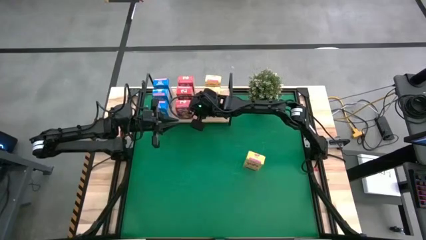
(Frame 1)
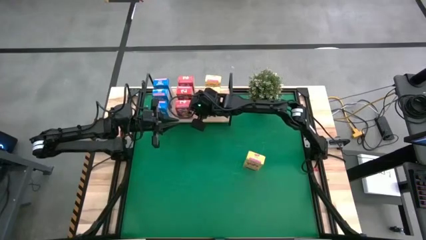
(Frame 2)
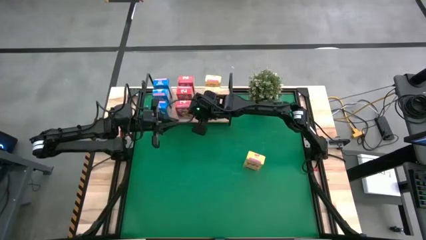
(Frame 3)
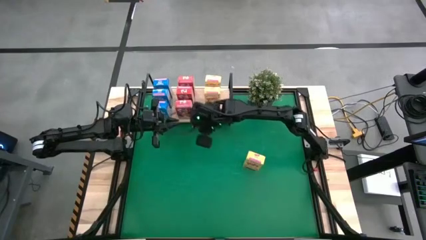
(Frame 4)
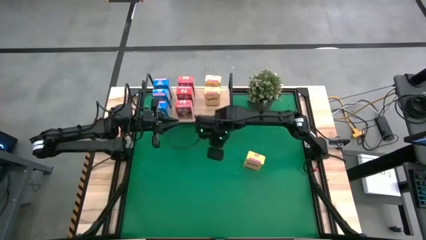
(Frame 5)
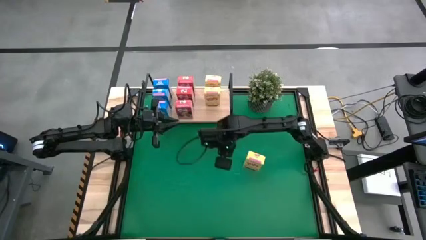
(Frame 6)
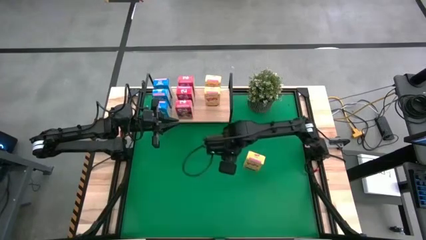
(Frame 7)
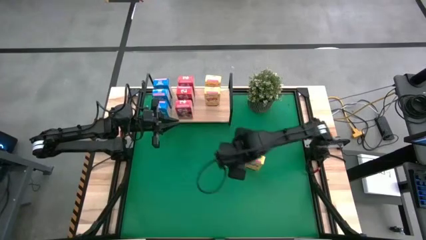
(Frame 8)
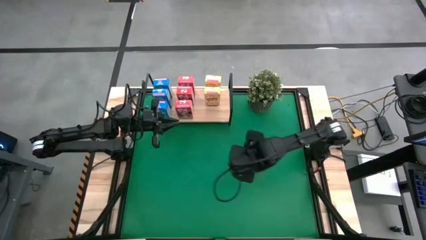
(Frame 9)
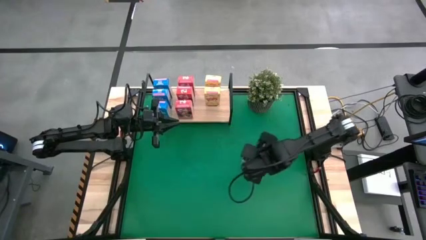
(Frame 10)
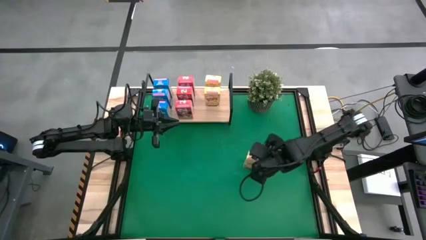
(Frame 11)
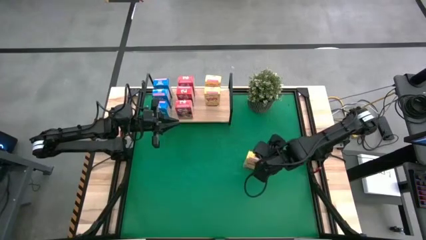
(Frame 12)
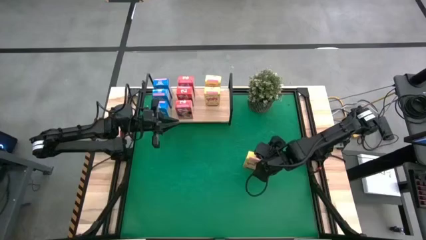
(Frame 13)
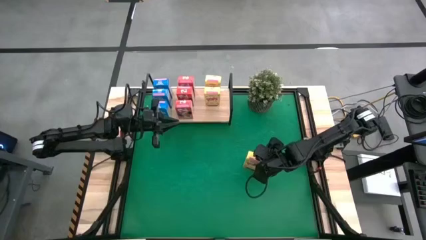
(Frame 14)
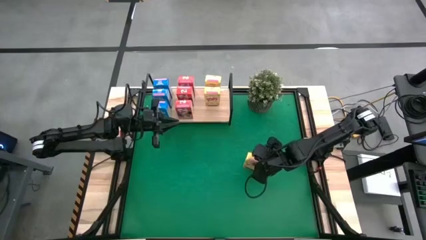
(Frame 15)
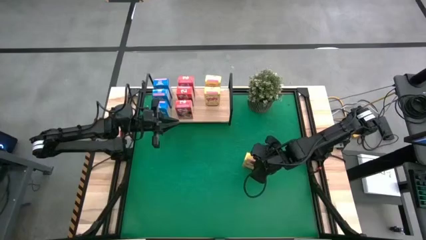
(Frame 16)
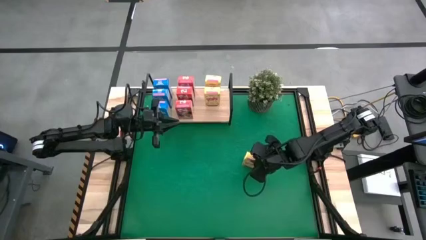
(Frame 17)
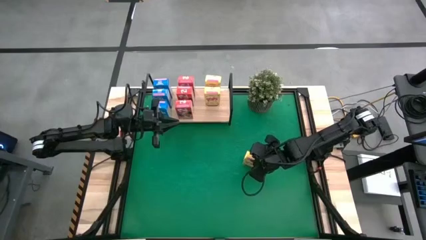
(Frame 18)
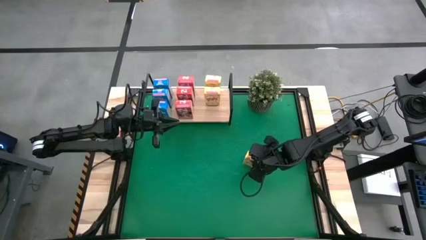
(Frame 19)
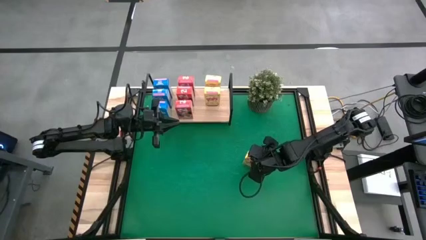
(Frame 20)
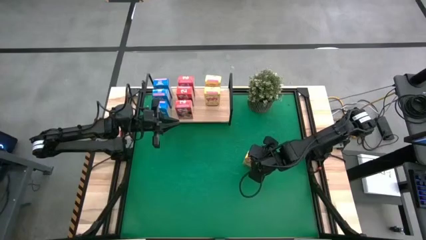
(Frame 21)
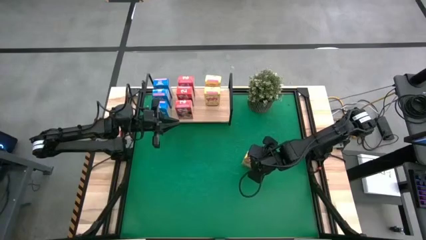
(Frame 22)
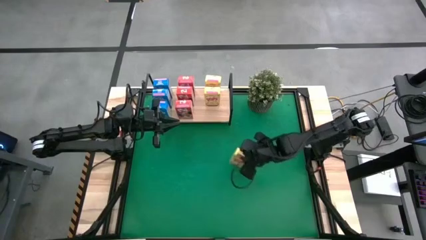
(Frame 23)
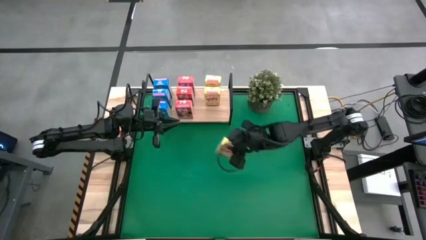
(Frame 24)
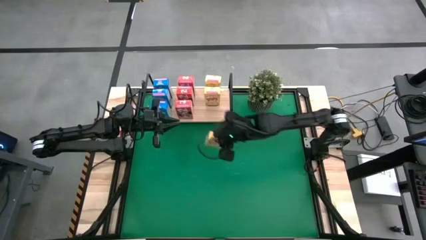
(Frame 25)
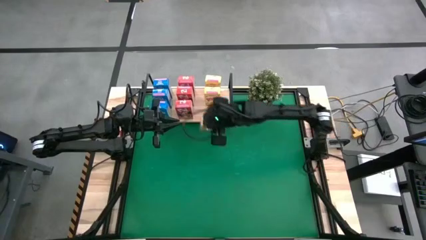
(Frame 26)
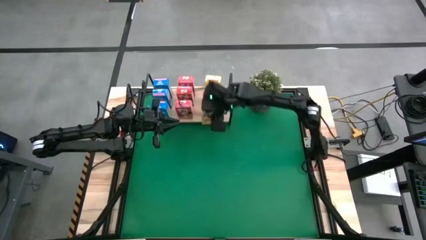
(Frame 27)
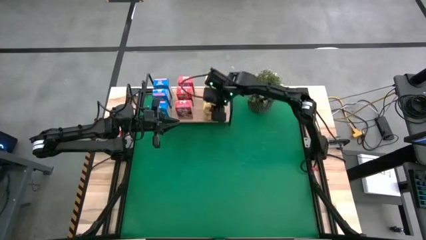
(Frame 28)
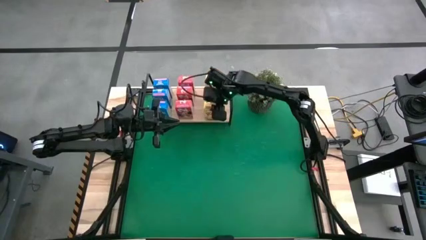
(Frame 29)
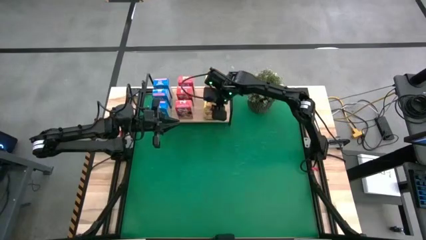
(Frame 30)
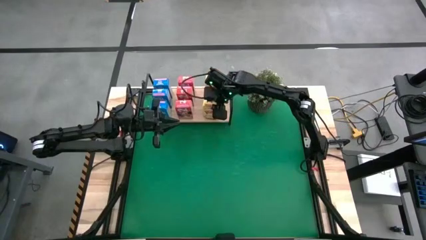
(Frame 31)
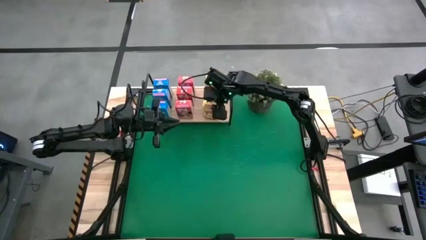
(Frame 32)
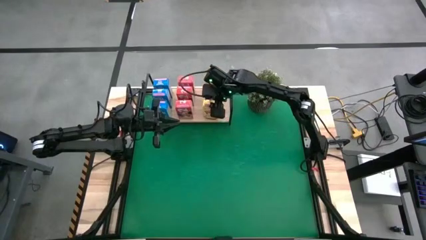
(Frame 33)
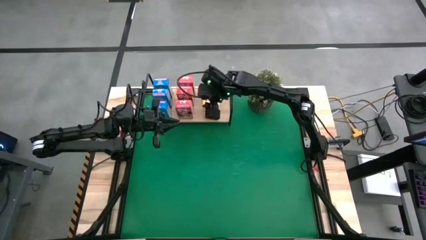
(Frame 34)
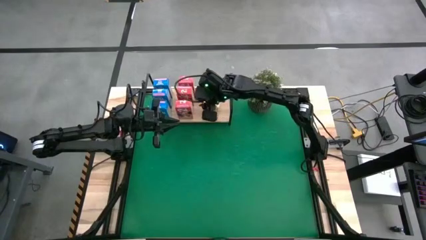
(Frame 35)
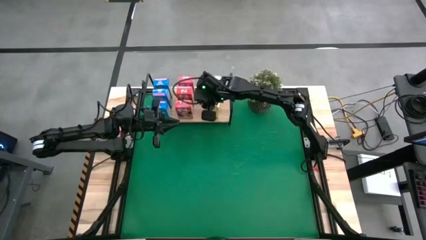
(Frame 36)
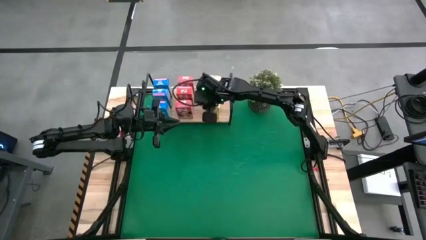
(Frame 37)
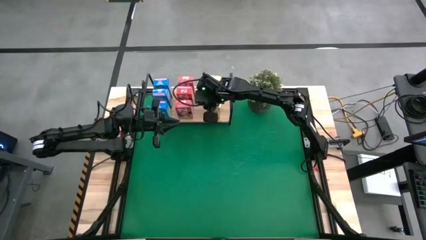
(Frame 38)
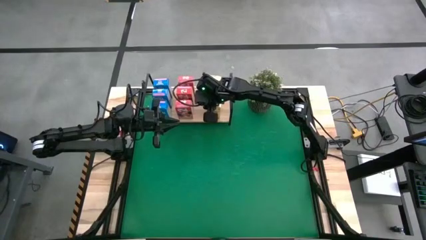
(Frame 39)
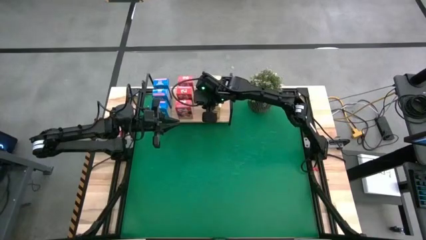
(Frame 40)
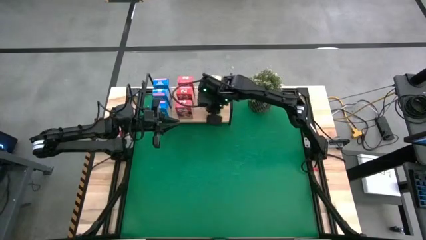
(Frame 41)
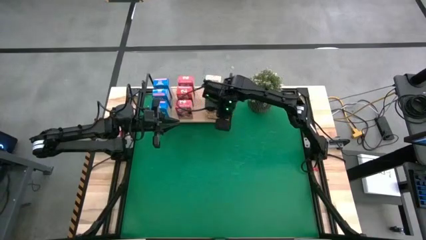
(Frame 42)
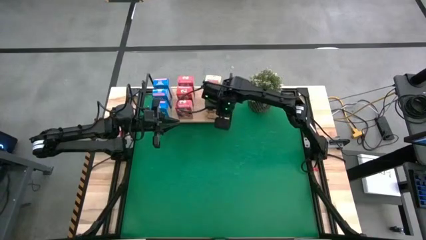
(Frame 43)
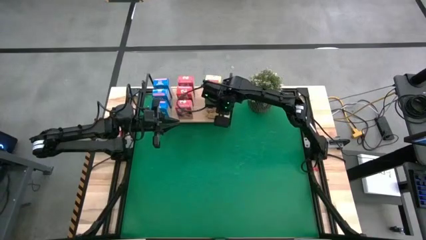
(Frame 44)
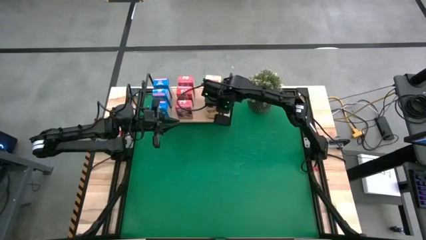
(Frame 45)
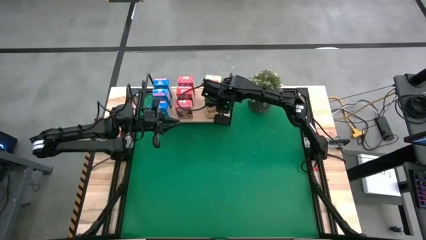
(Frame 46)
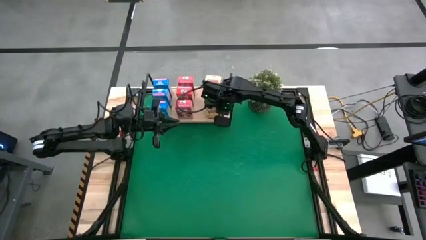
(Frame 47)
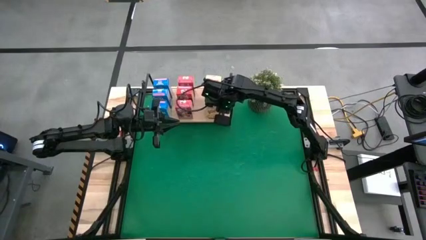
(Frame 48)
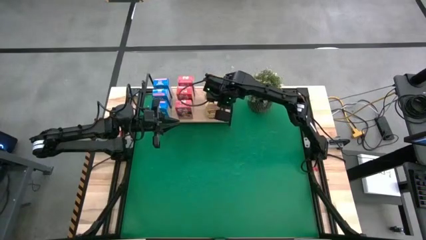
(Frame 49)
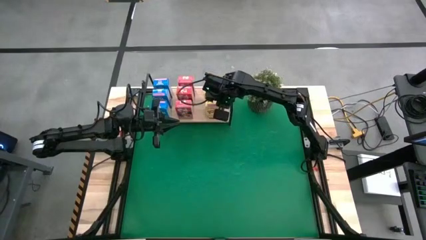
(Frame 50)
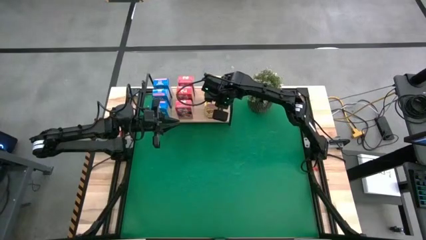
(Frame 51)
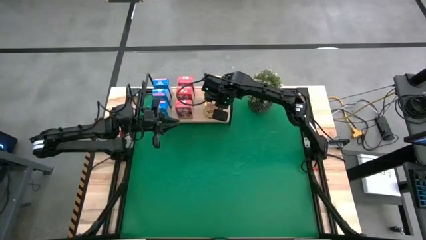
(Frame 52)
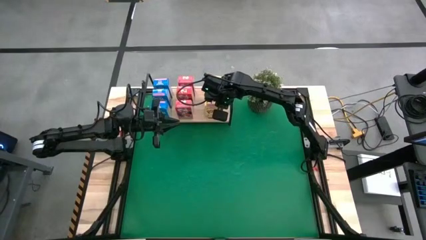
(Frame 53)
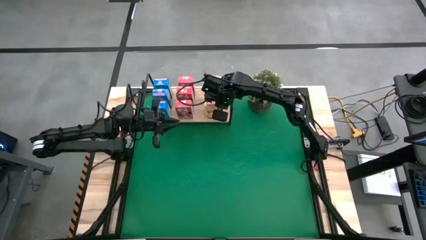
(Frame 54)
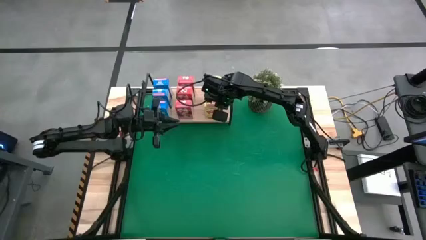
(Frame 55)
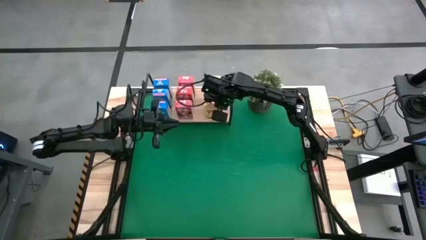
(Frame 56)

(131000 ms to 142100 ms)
Task: Stack cereal on shelf
Put the yellow cereal box aligned with the other yellow cereal boxes on the shelf

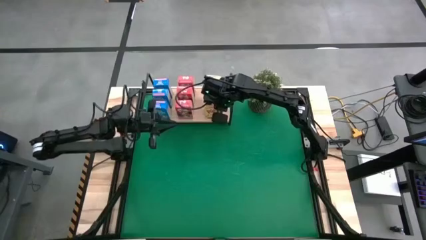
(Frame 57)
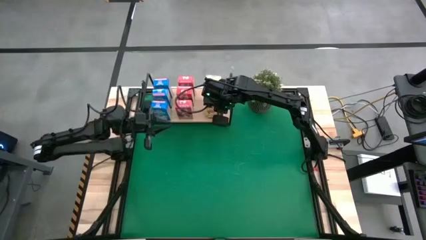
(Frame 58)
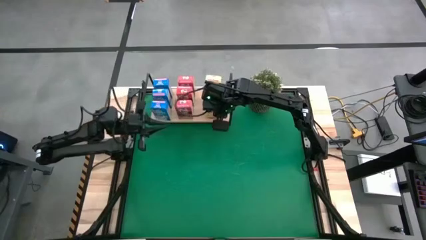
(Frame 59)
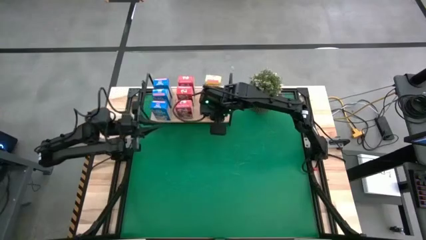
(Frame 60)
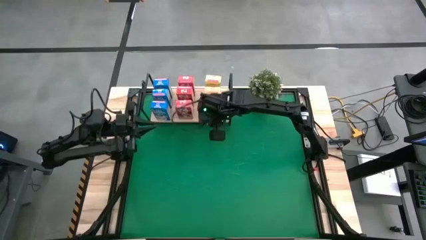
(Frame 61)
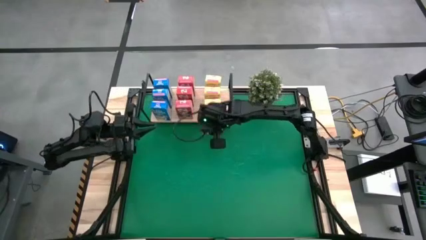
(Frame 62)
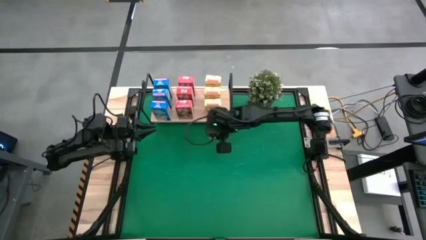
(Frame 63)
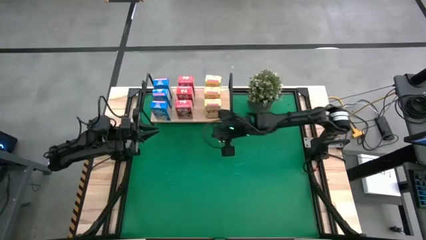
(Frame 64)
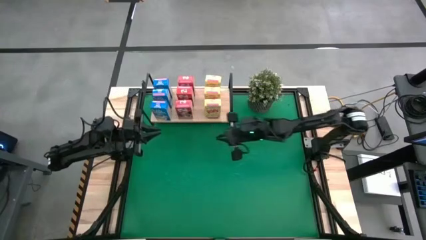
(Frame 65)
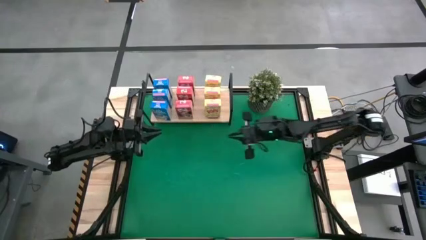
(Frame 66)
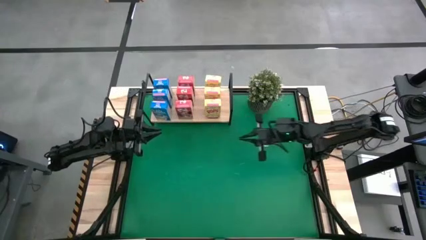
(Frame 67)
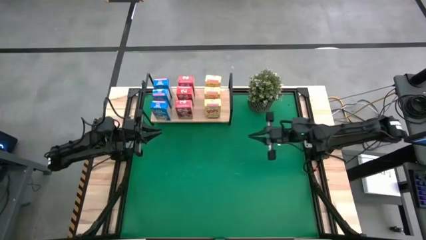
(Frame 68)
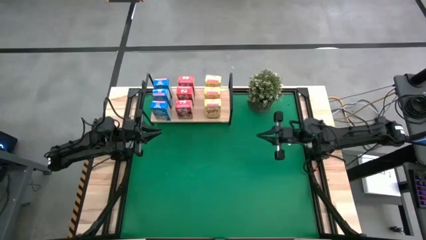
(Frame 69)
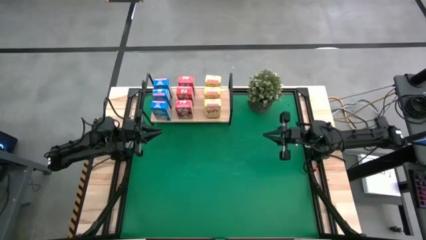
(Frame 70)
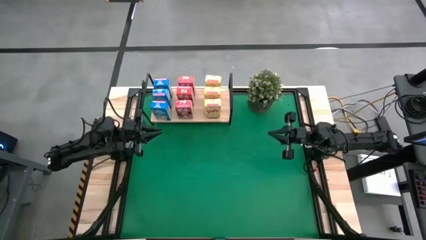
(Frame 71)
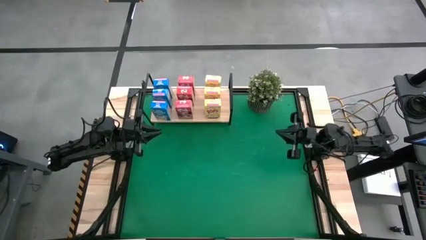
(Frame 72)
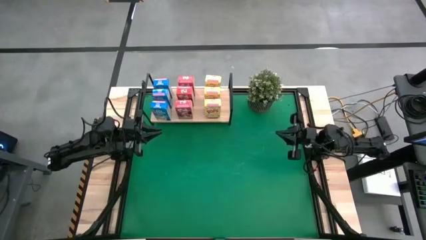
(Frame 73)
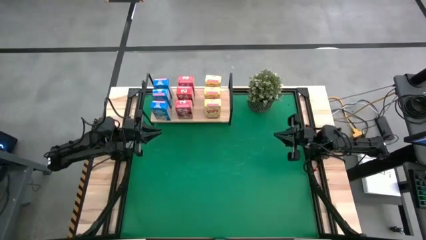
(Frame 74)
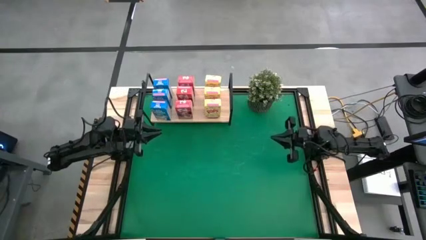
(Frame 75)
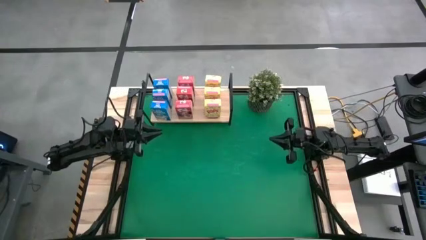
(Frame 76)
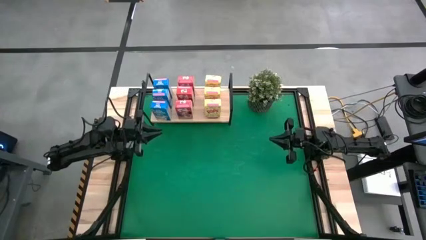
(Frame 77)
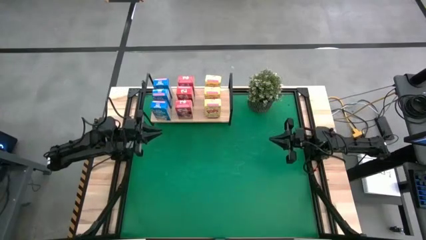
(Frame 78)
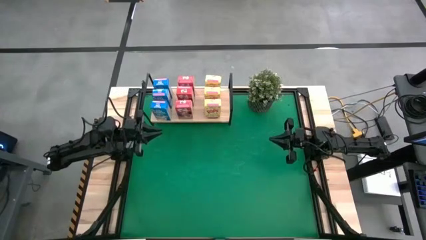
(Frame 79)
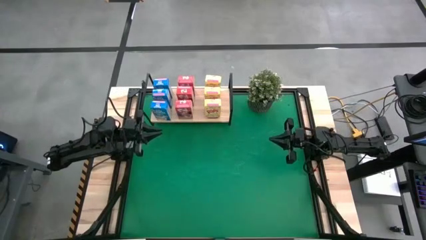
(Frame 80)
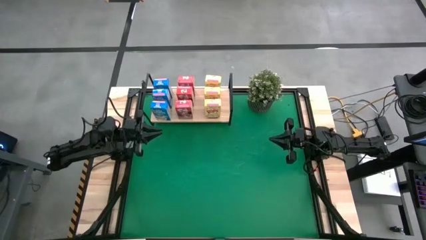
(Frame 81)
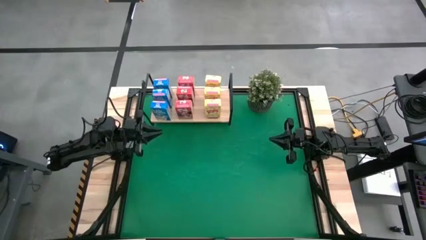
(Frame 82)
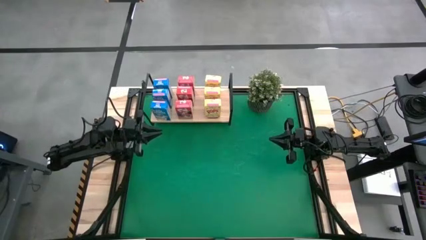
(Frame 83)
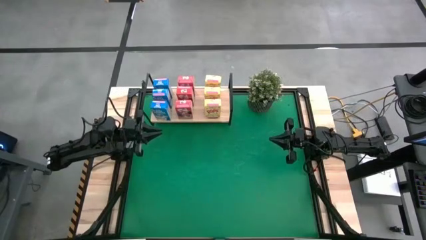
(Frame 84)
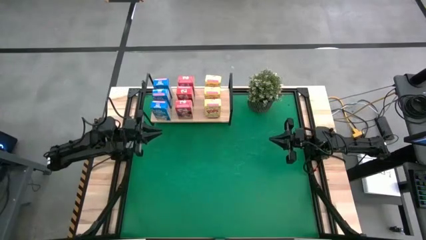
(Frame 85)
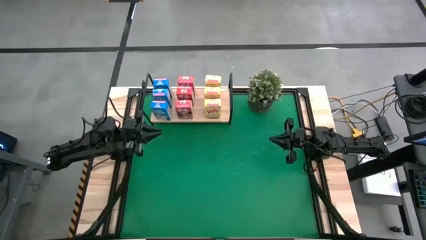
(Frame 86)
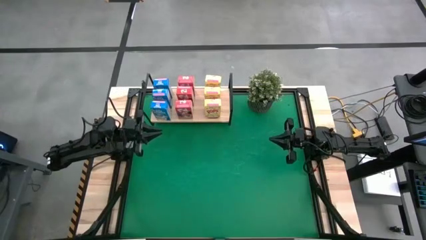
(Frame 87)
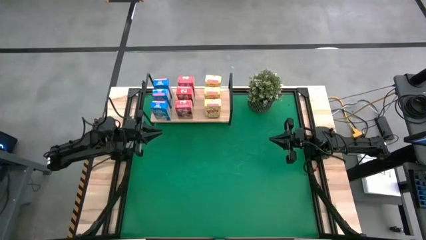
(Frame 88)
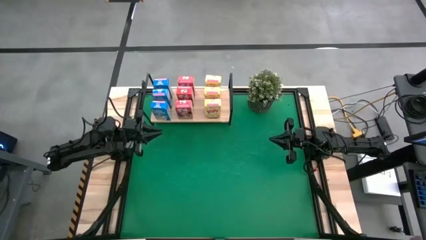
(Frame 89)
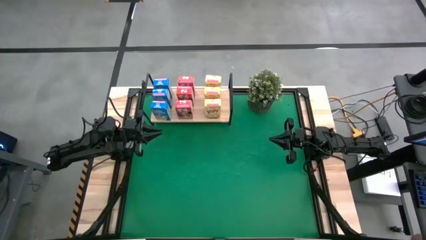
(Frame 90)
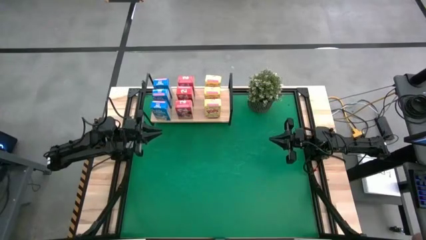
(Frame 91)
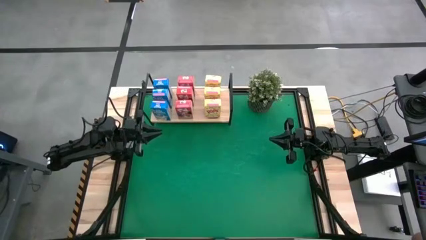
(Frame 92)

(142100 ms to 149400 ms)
Return to Home Position
